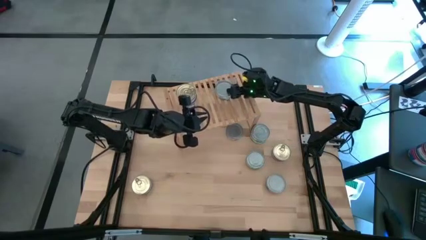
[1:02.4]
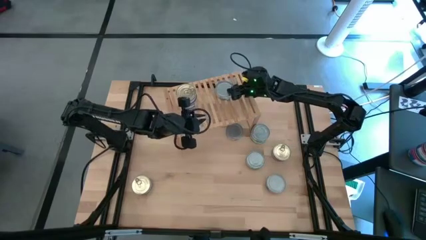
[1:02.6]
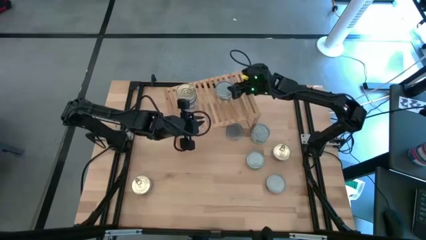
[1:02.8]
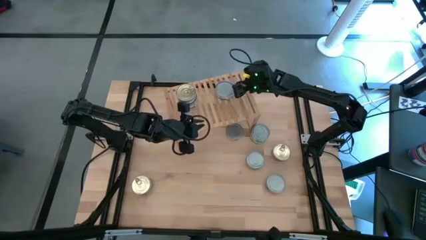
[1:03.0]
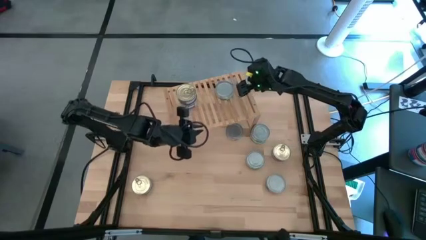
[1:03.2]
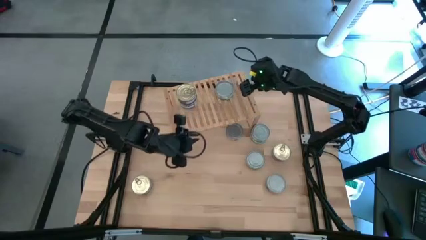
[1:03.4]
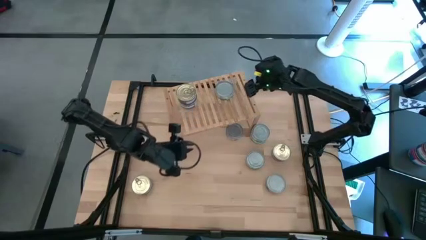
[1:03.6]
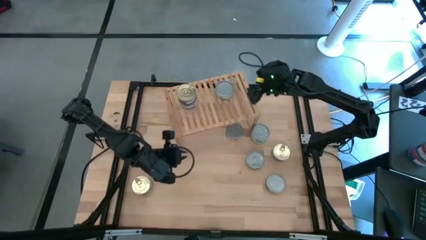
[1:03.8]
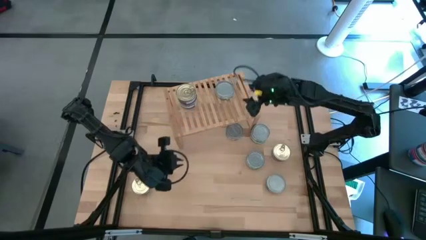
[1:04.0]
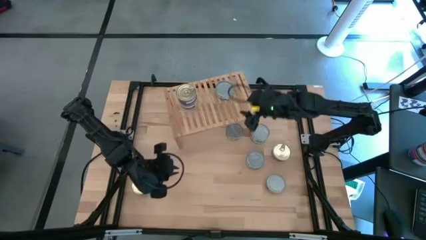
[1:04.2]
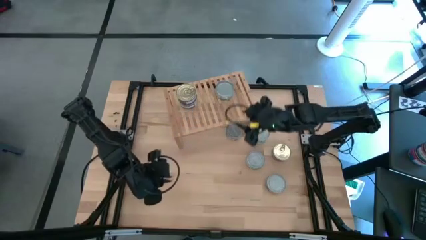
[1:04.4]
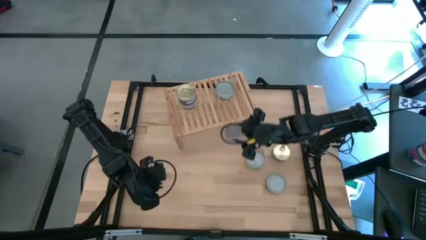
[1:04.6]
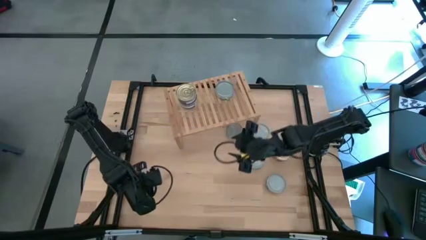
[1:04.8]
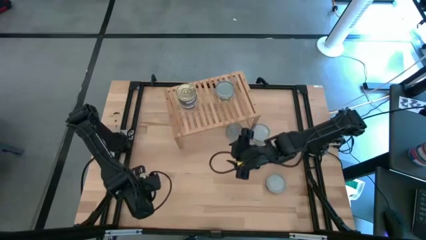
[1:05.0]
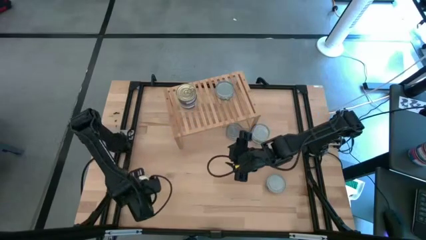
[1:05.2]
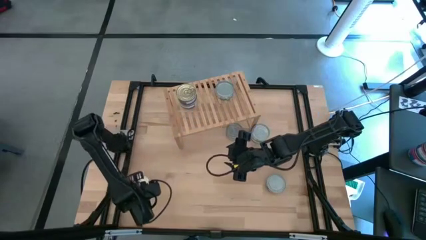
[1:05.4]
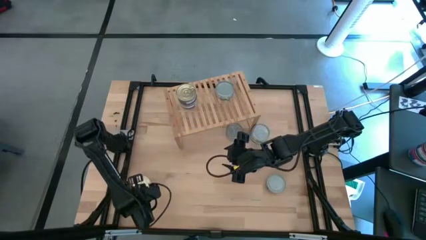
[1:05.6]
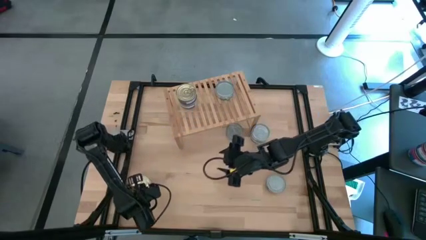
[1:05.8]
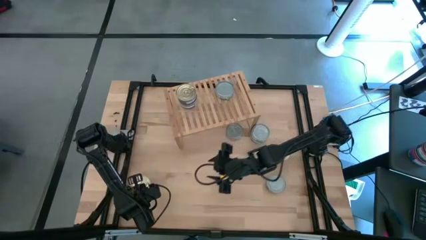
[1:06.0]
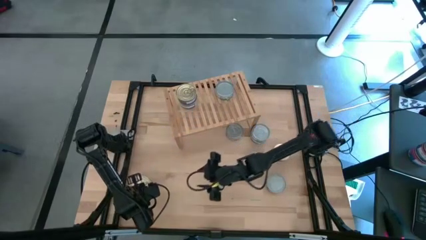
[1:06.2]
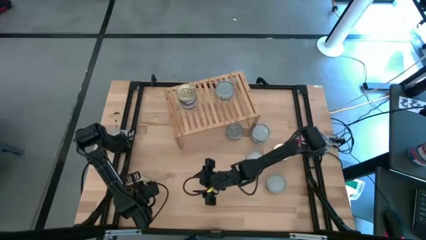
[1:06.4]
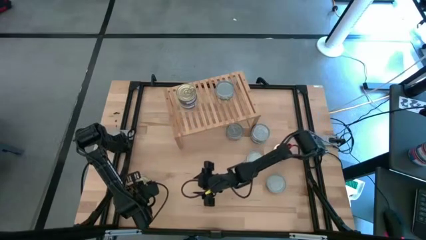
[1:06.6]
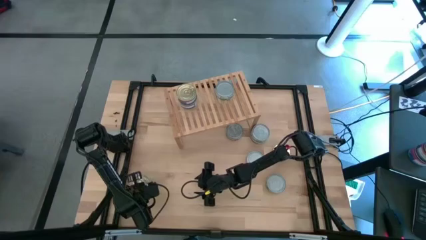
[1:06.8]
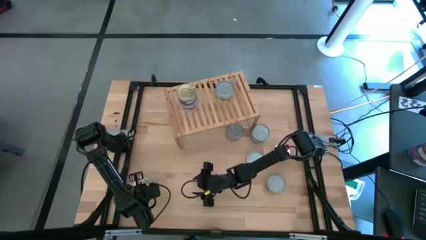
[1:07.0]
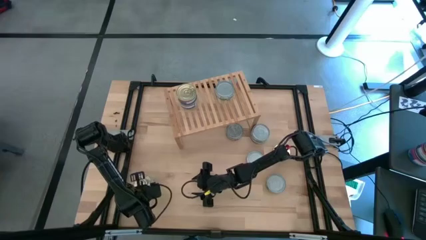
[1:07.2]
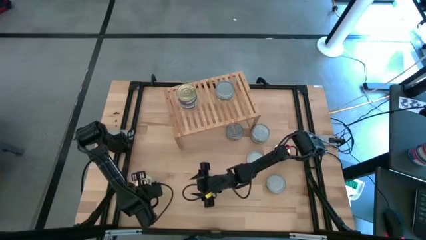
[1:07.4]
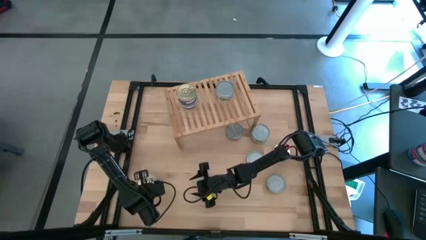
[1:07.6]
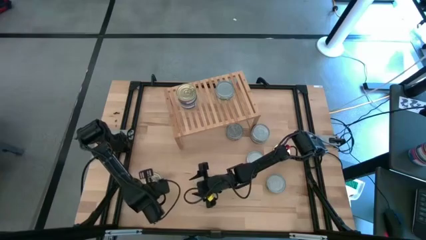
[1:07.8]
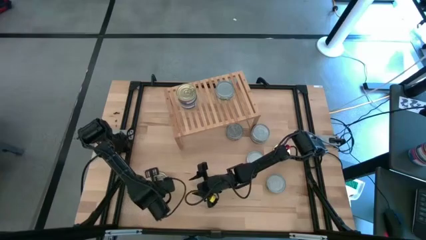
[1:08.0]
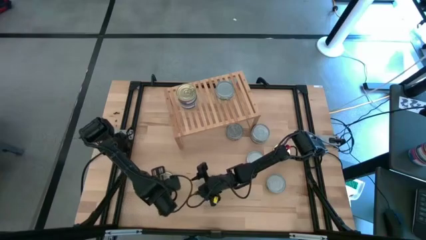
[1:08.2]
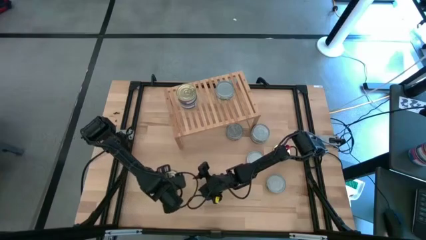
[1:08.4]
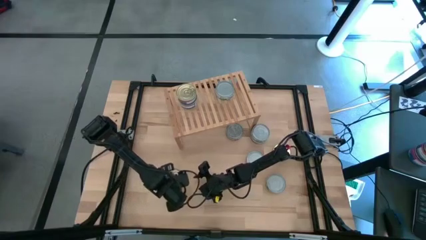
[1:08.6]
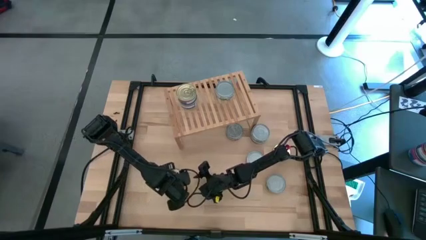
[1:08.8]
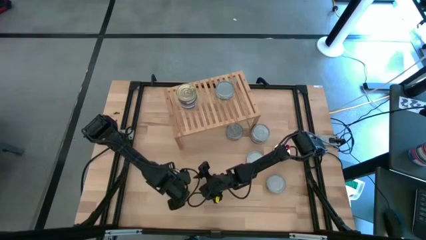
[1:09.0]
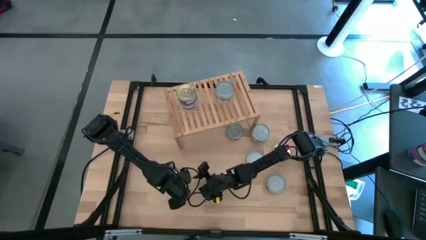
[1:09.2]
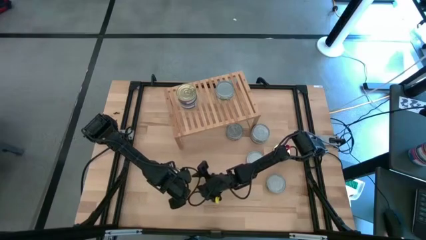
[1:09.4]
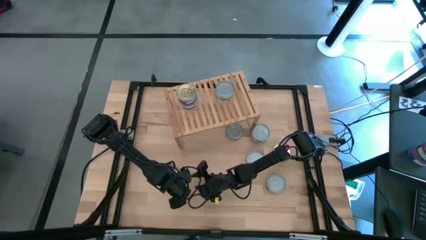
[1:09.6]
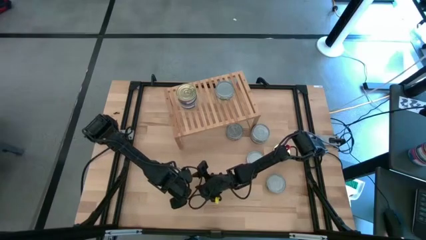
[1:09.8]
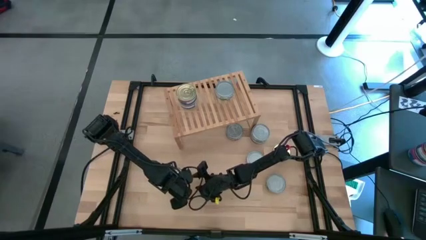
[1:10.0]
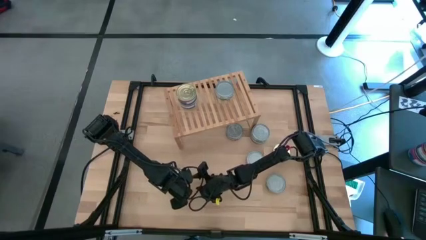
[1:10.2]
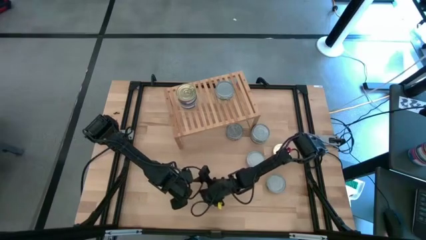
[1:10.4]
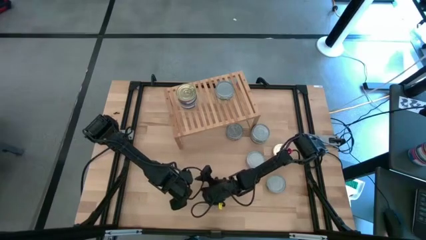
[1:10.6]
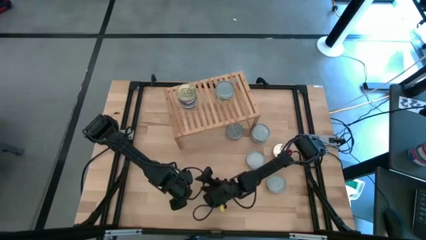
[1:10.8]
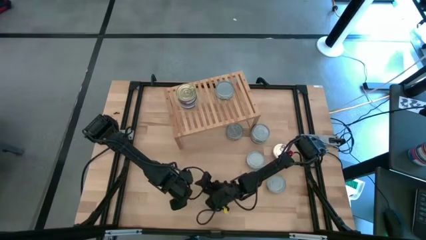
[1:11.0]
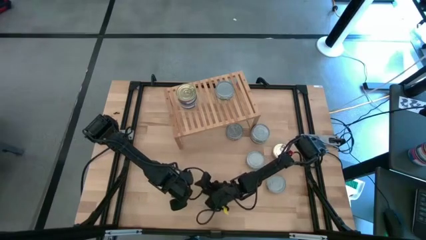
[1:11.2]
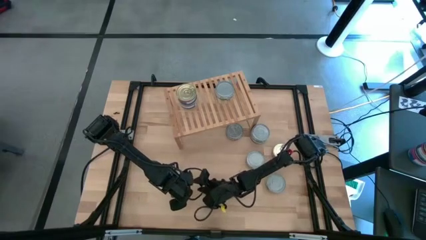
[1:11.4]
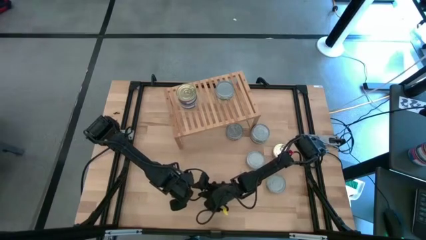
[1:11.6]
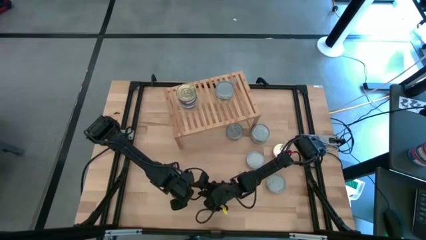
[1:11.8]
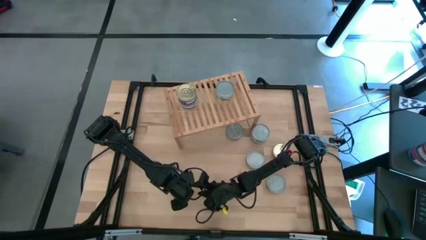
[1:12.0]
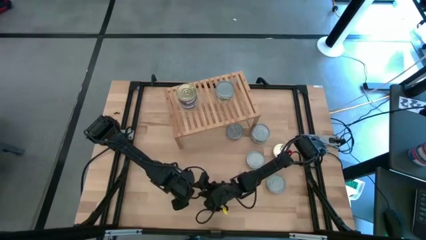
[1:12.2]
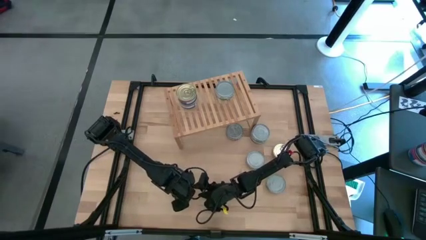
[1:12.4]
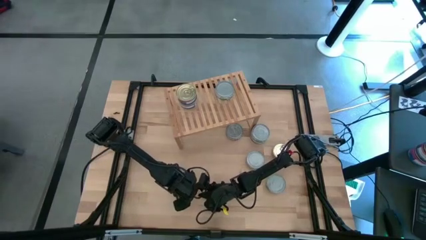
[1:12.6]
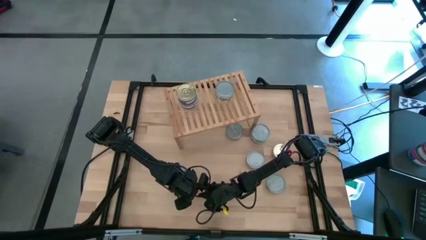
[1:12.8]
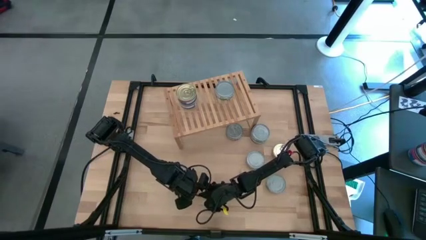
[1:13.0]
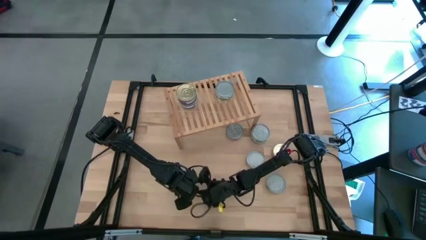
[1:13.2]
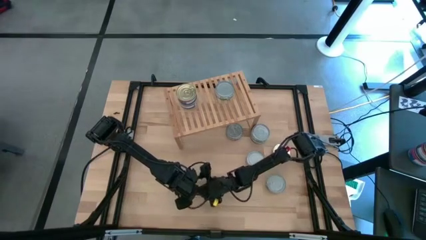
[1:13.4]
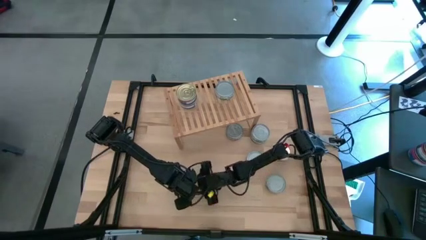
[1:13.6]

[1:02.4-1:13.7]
Task: Stack canned seafood by type on shelf
Put the blue tuna can on the shelf aligned with the other blue tuna can
